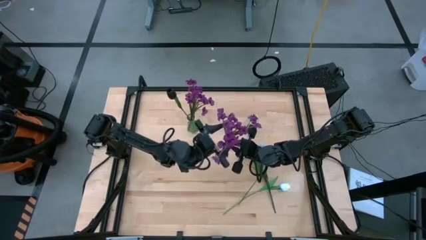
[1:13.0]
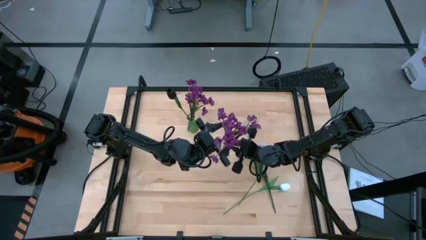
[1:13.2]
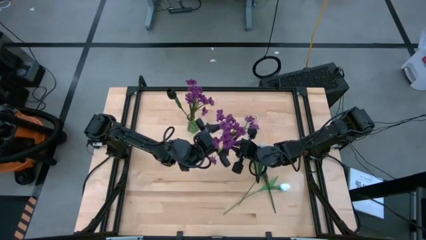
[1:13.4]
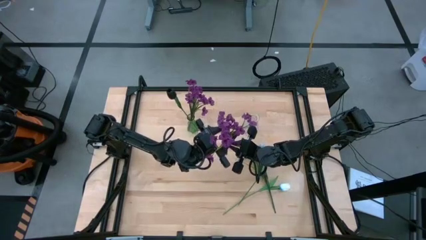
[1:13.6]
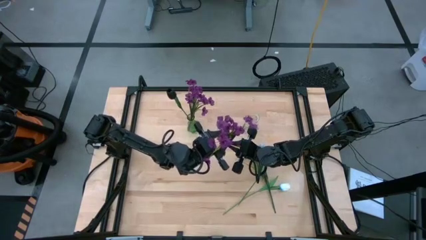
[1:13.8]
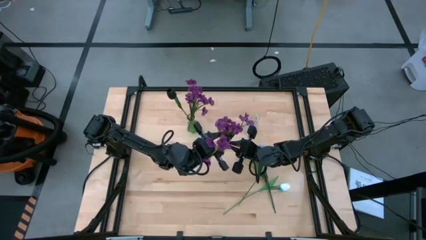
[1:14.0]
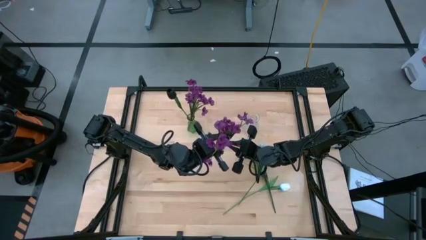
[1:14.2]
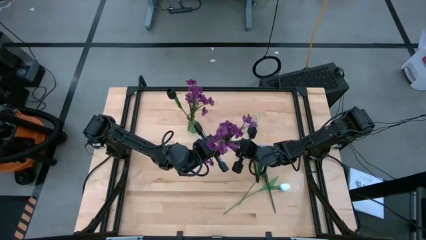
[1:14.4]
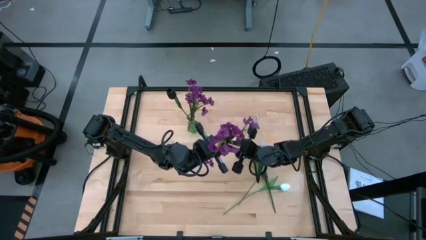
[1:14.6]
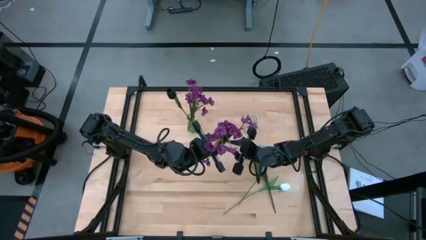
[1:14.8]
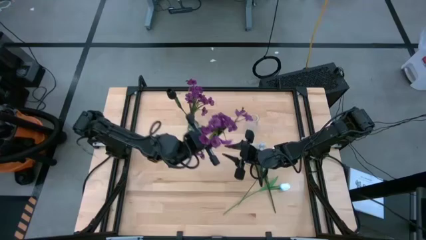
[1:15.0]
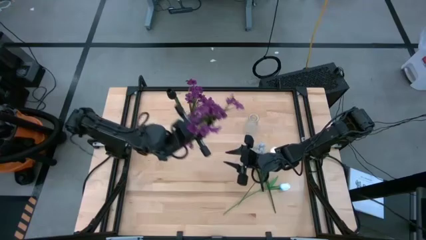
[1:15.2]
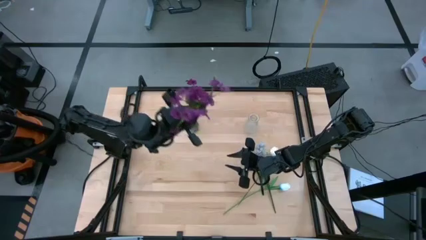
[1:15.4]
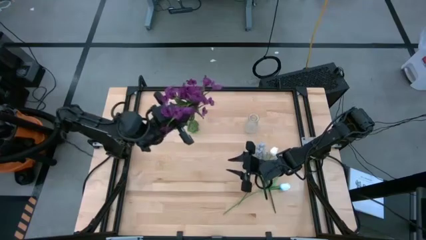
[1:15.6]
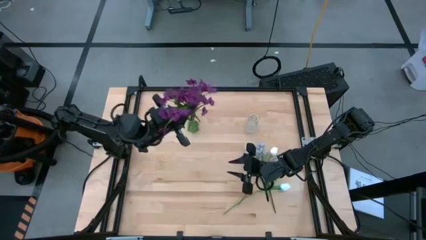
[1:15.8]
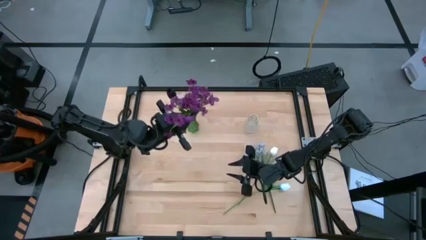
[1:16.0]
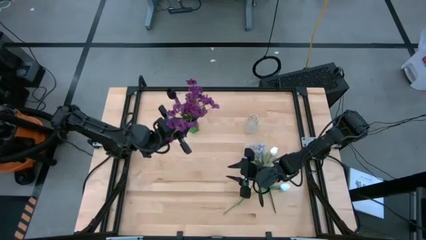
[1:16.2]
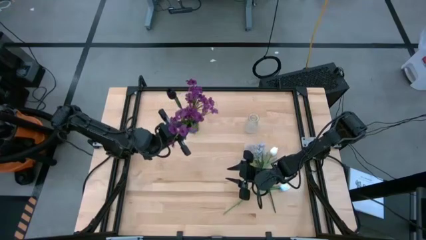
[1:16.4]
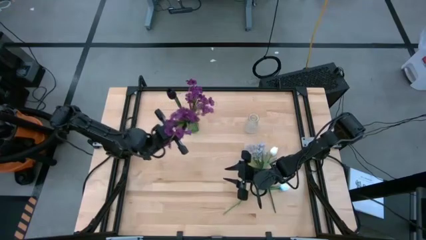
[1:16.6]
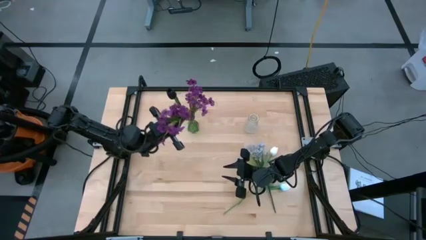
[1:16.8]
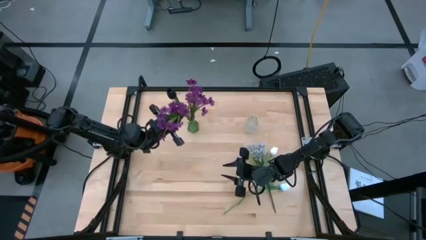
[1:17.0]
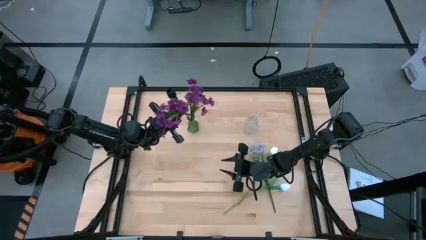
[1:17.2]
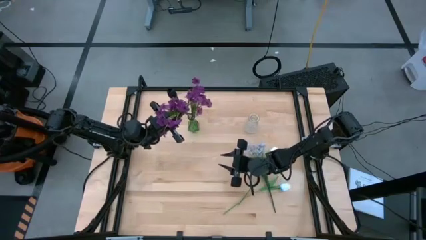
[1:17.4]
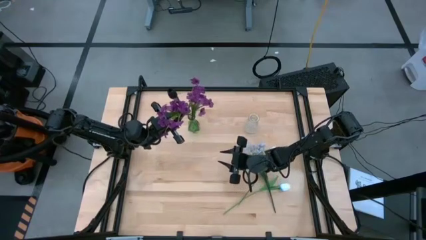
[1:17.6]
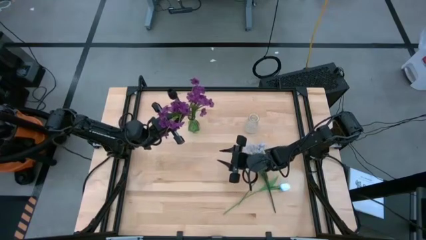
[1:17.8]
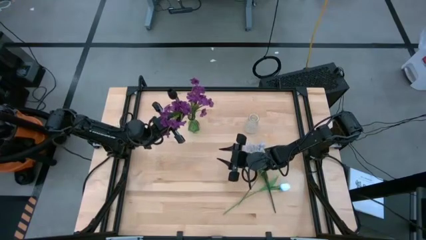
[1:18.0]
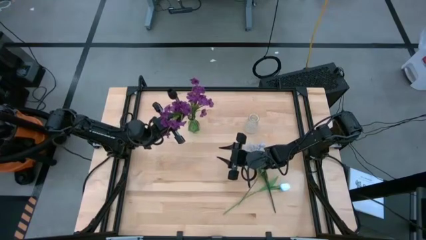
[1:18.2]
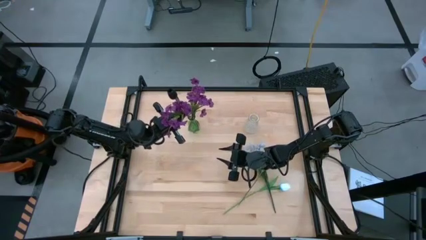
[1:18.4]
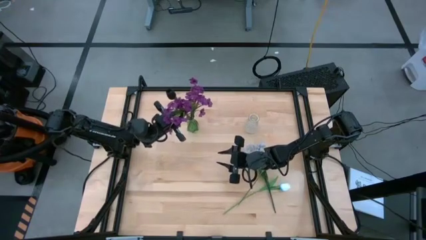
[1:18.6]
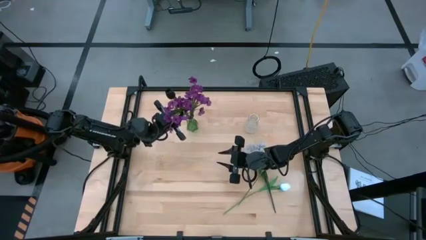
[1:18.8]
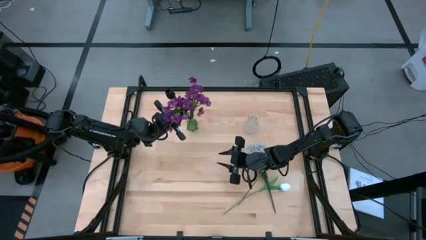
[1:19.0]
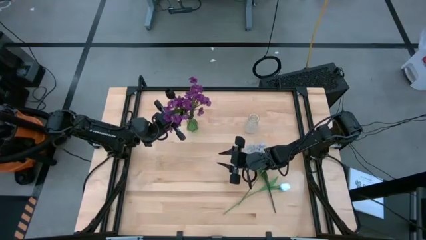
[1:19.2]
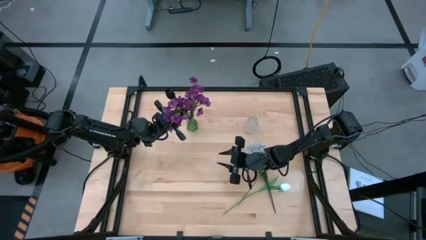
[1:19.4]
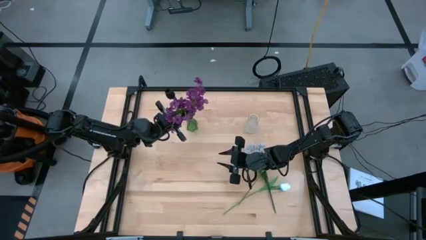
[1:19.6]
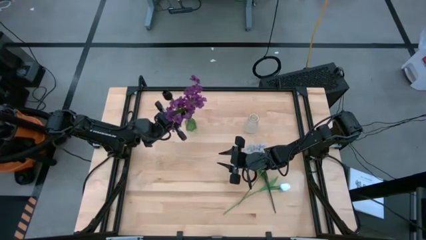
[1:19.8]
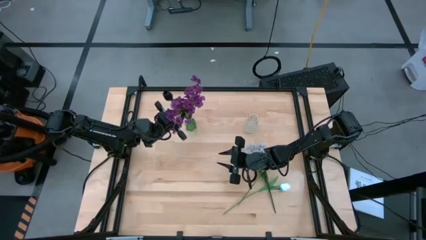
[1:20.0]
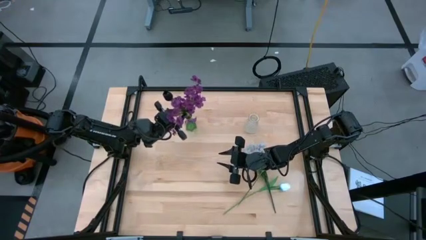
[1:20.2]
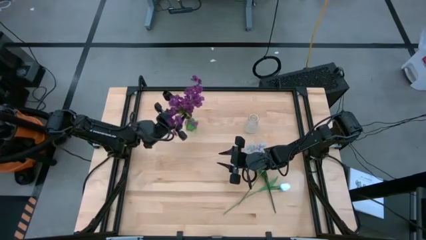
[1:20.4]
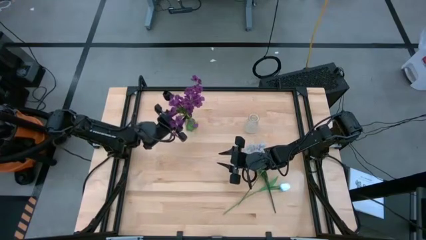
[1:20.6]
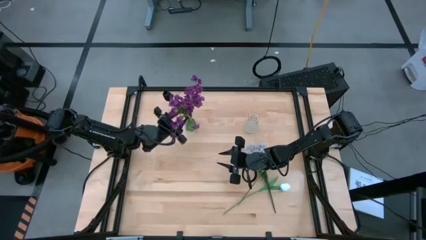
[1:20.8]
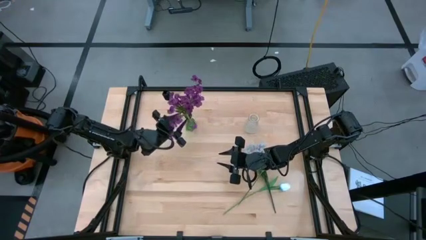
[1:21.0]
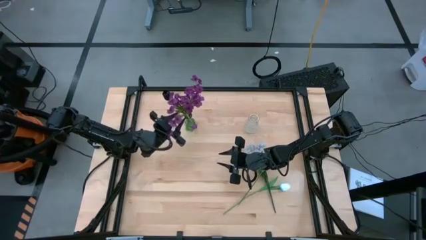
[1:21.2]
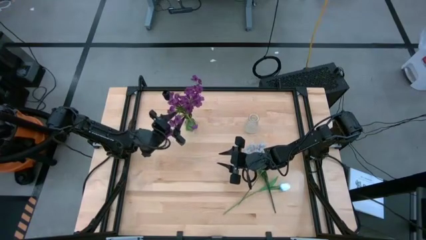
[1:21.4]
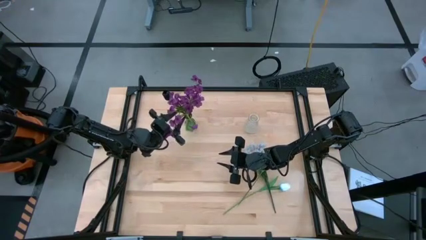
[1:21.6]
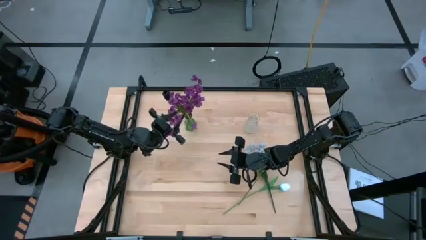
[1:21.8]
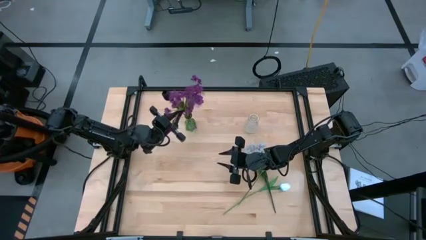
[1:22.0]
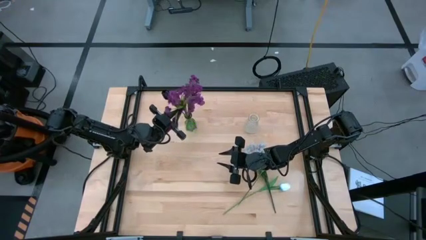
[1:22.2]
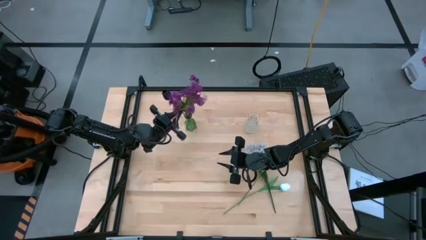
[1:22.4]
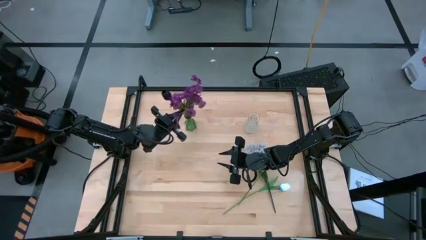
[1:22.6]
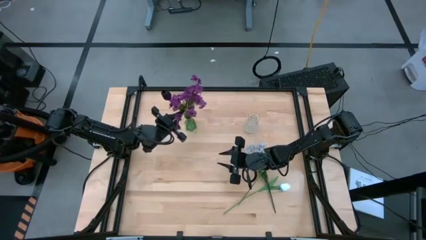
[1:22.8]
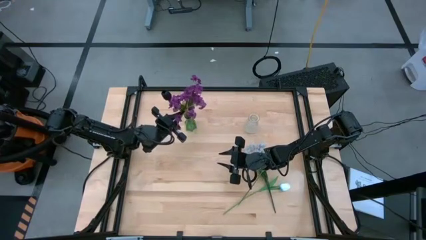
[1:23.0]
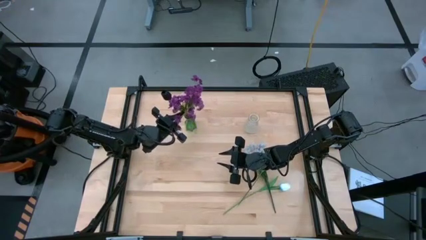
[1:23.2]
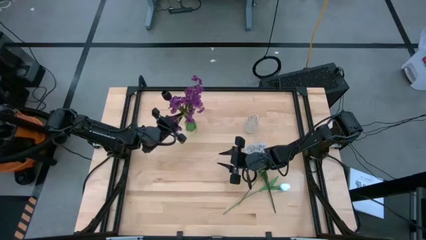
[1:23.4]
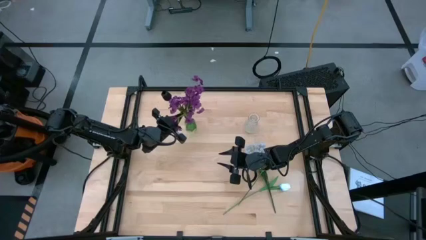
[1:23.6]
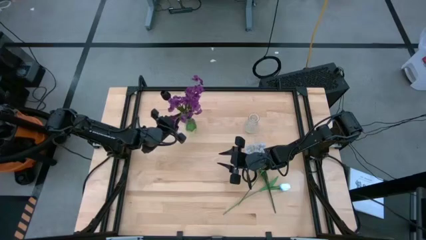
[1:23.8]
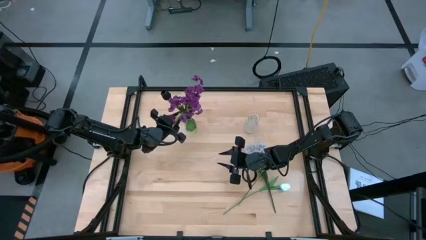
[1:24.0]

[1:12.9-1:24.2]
Task: Sort flowers into vase by color
Put the purple flowers into the green vase

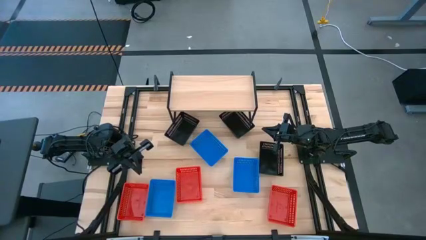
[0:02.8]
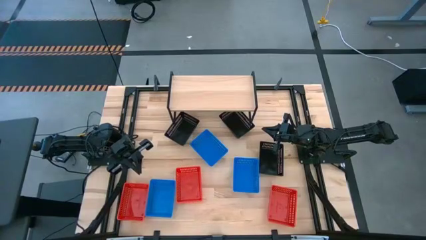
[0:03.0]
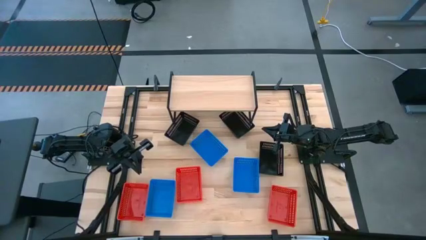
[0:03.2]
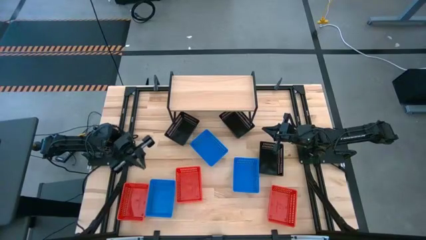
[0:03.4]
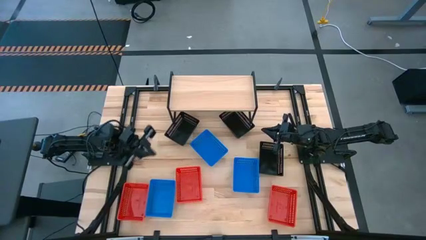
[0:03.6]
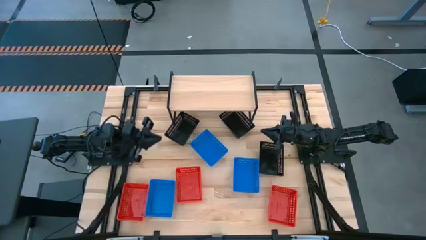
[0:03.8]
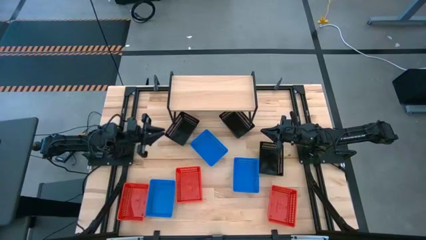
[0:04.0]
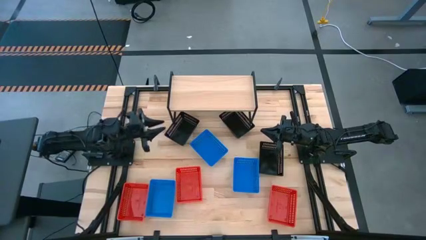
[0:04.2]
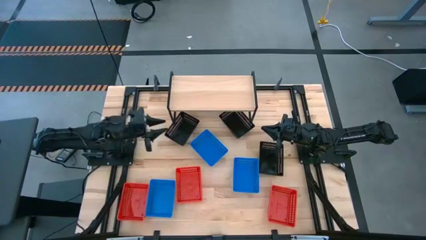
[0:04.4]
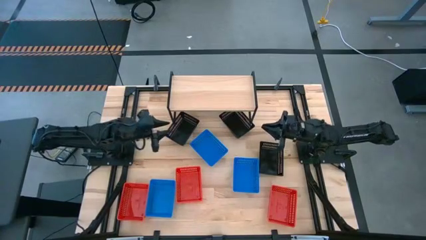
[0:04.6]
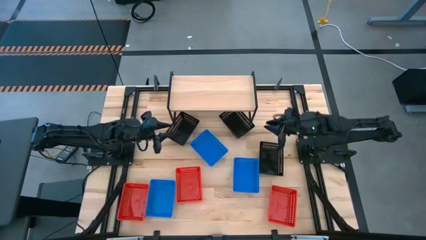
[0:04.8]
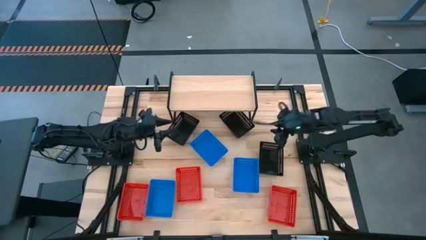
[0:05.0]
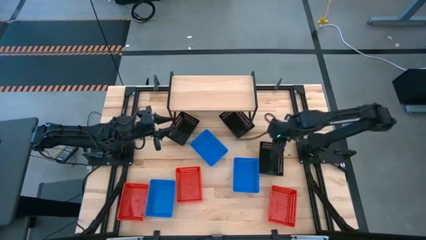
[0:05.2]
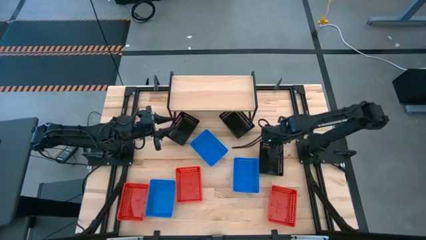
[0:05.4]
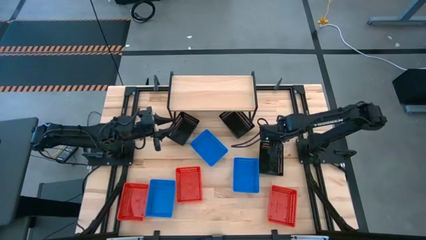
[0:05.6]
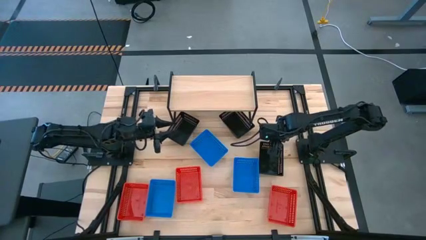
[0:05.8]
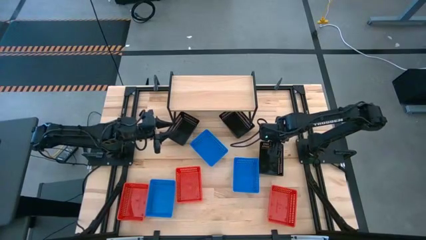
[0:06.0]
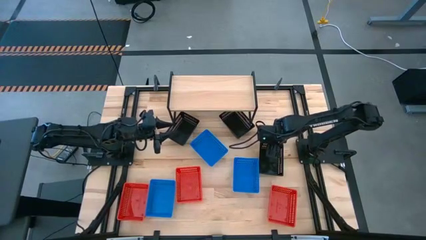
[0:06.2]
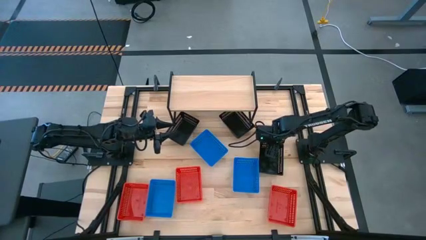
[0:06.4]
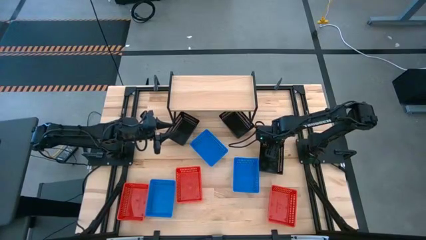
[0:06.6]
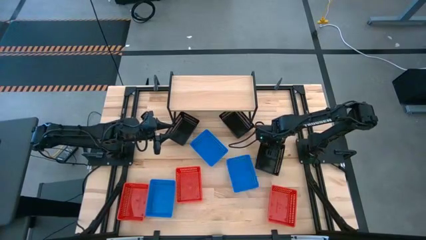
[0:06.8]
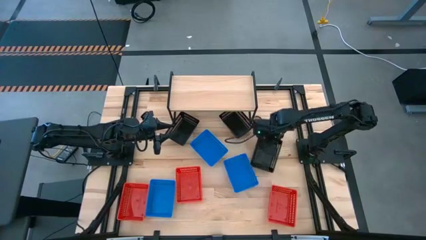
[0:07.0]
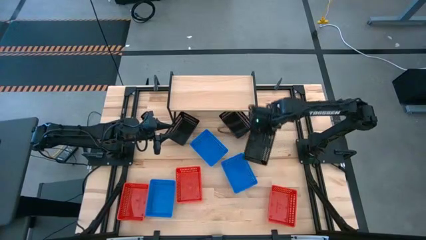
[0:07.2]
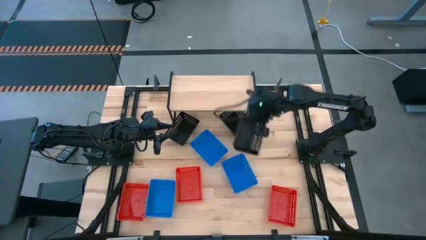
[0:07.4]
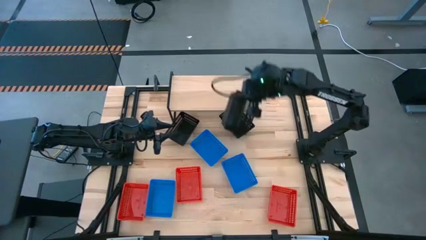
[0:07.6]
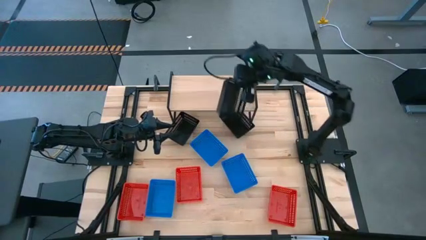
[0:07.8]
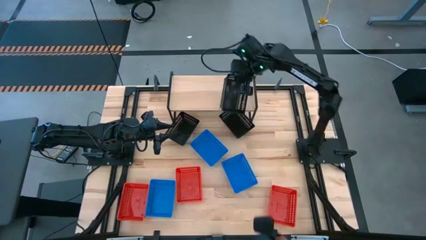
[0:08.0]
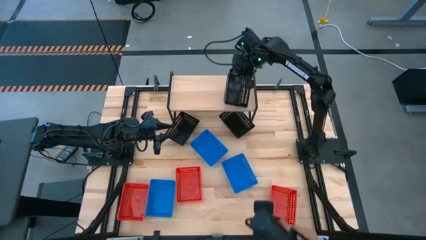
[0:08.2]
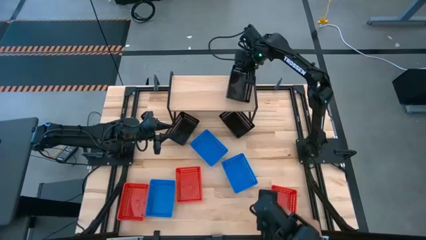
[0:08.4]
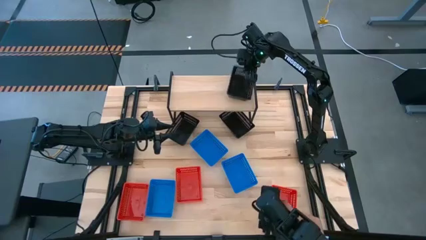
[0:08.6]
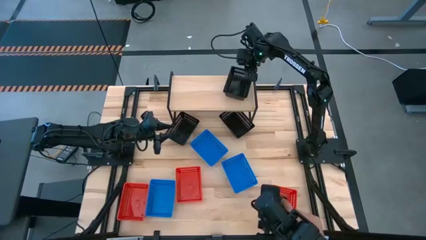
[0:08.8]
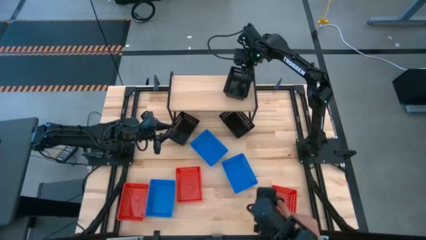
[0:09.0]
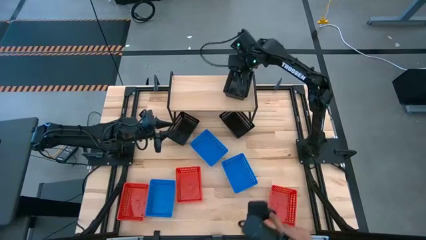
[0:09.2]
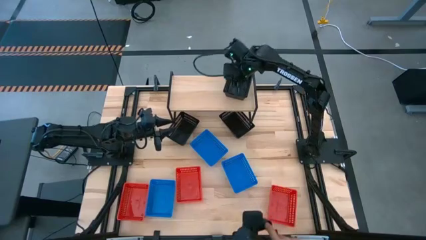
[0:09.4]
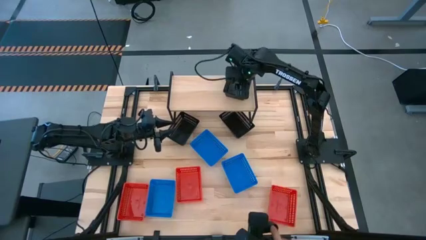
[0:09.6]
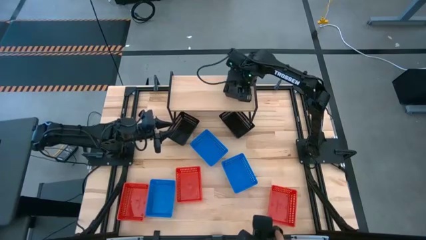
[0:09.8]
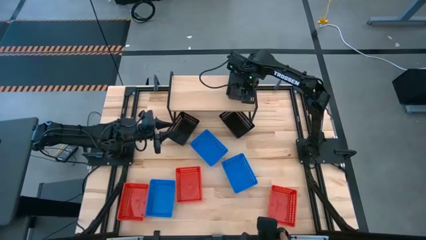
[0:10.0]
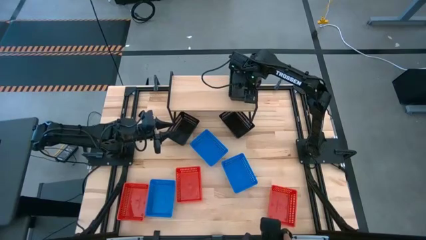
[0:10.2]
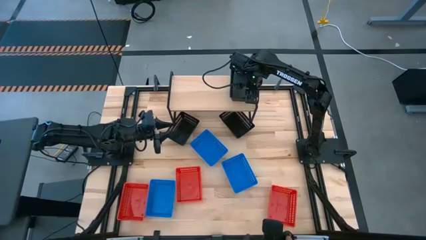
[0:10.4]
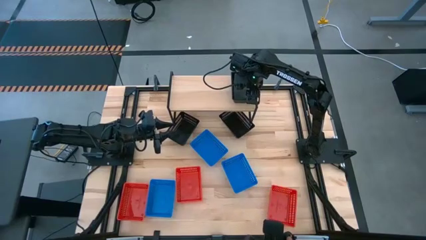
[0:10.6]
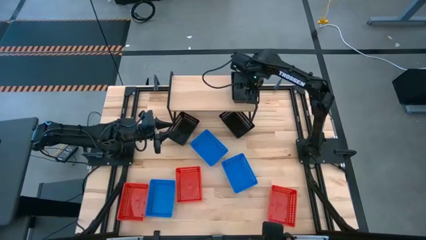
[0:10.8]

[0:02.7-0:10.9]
Task: Stack baskets on shelf by color
Put the bottom right black bin on the shelf
